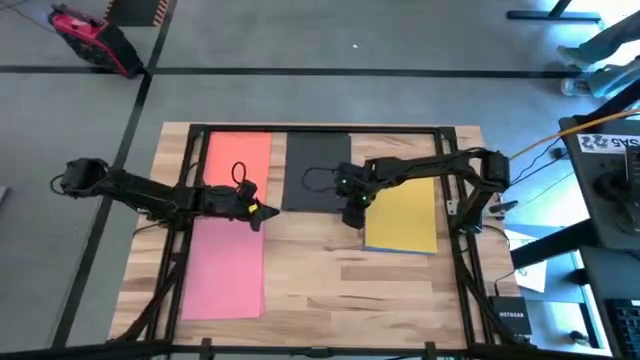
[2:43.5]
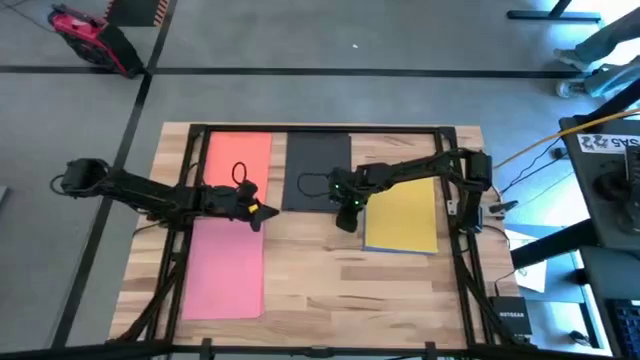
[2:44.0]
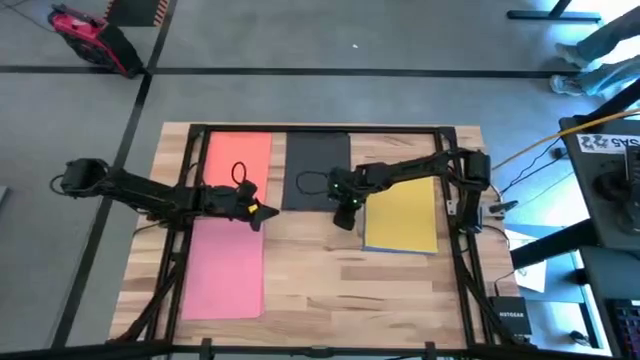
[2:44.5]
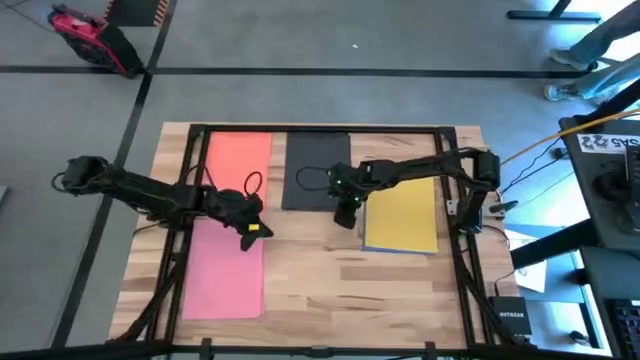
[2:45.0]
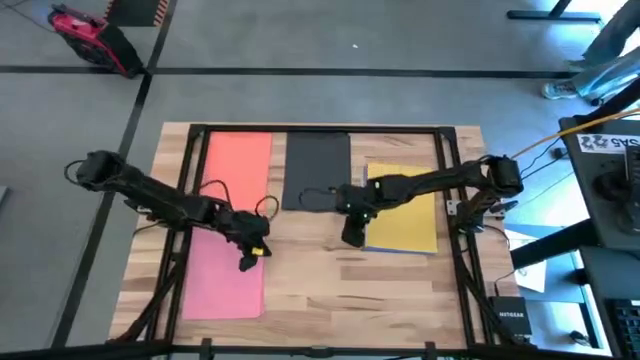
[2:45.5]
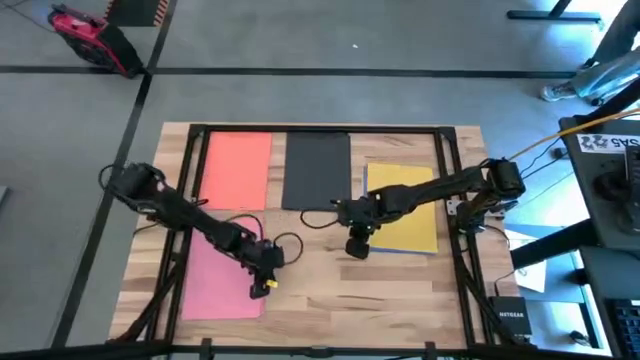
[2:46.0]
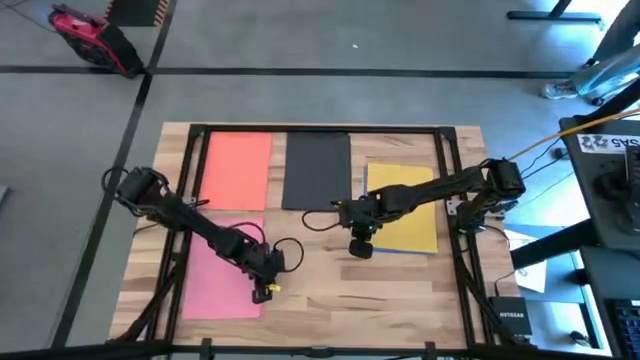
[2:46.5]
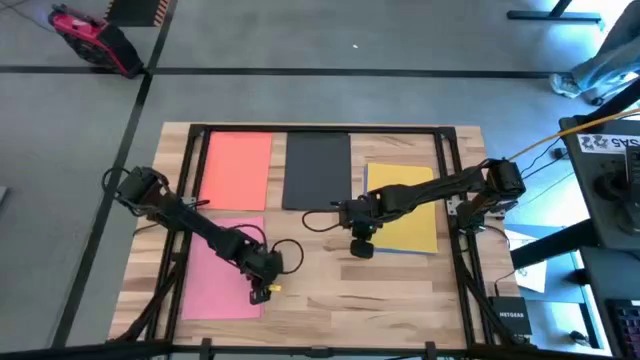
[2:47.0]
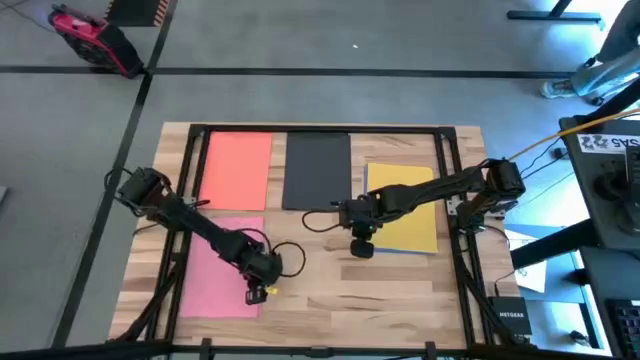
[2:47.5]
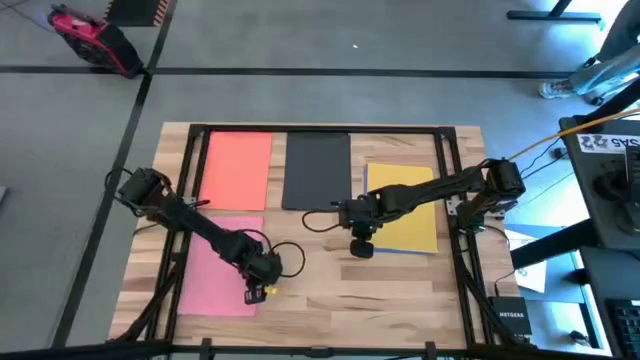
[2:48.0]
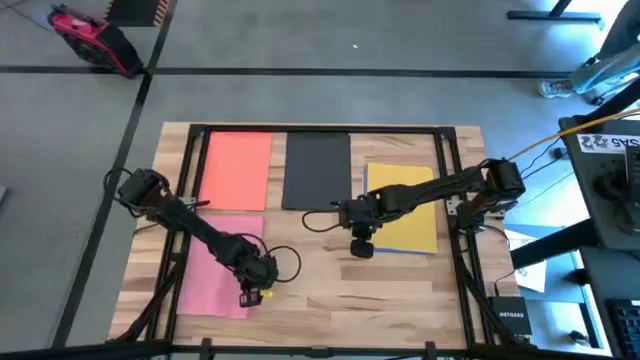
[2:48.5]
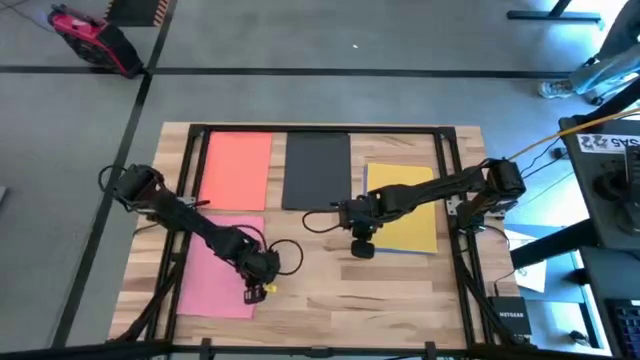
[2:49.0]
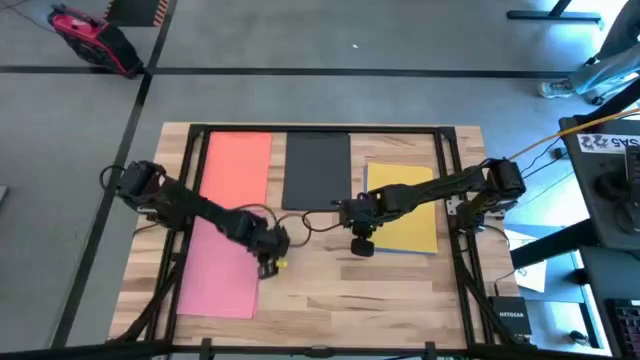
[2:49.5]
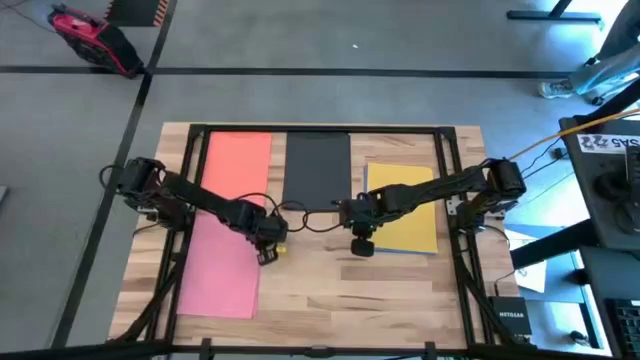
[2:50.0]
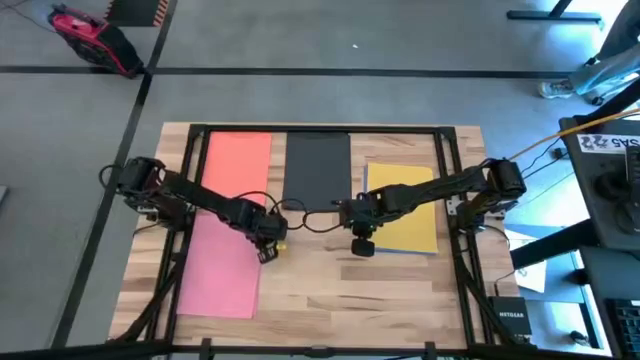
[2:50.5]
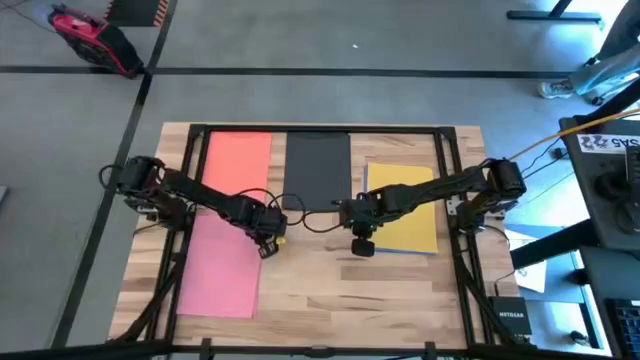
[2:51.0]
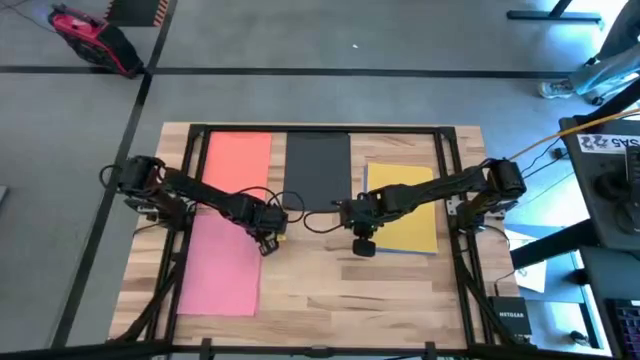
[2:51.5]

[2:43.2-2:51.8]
Task: Organize paper
Adjust the stacked pink color papers

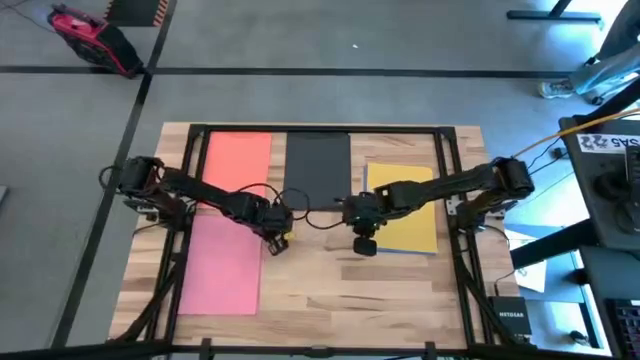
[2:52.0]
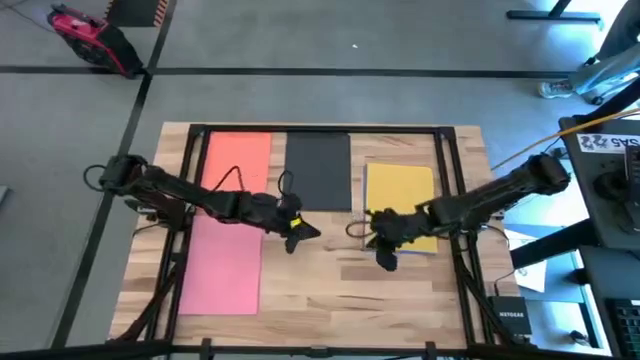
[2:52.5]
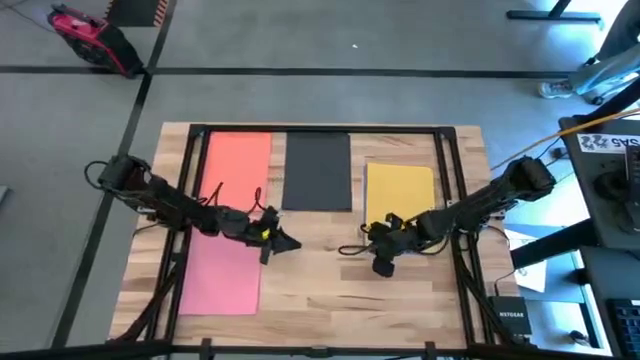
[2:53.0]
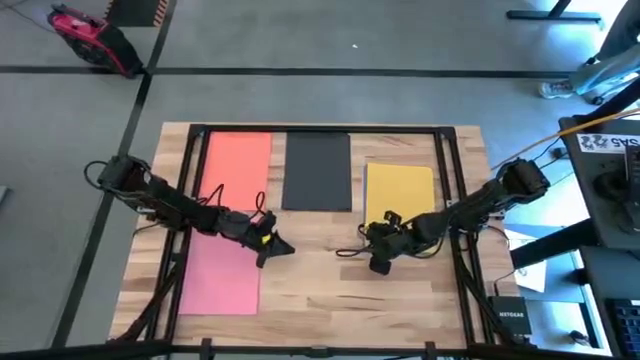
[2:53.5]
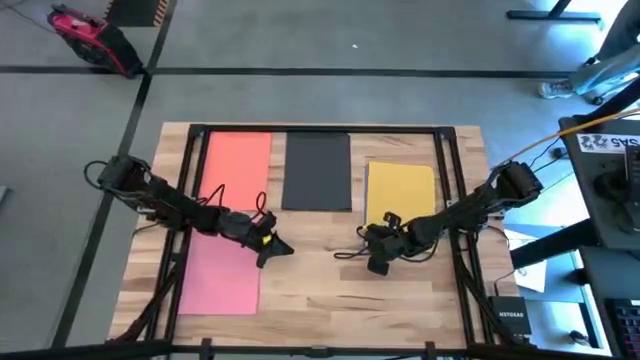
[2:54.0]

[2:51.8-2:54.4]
Move the yellow color paper to the bottom center of the table

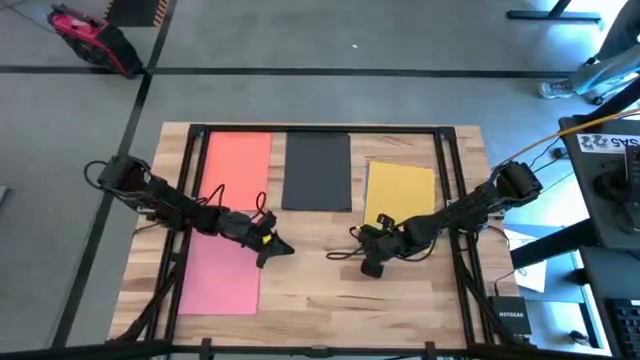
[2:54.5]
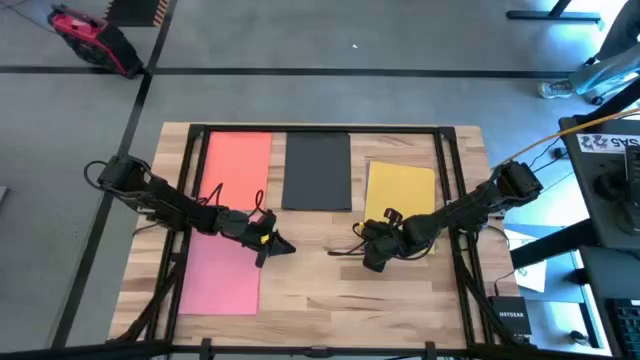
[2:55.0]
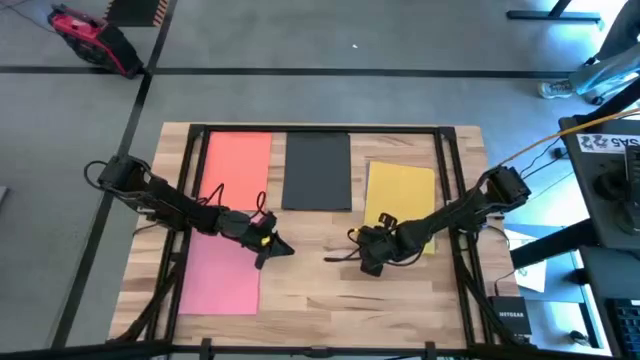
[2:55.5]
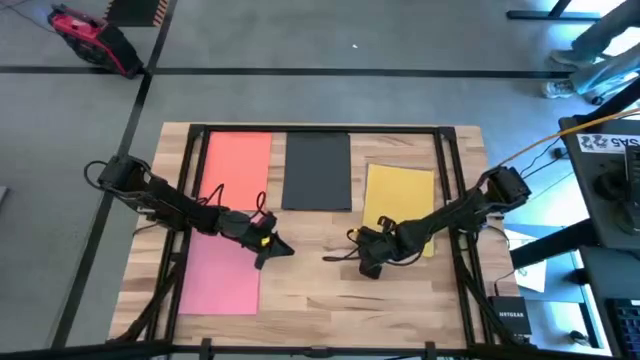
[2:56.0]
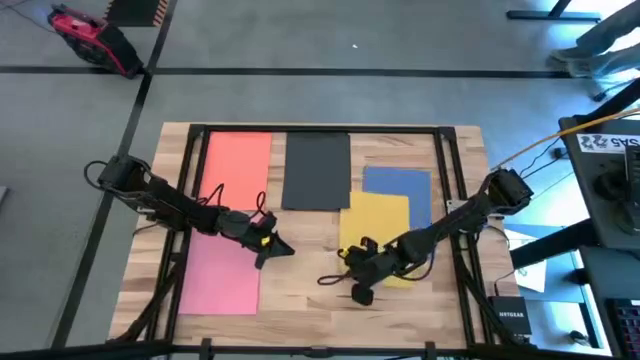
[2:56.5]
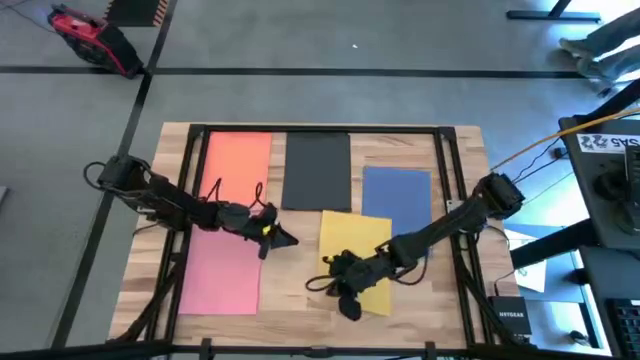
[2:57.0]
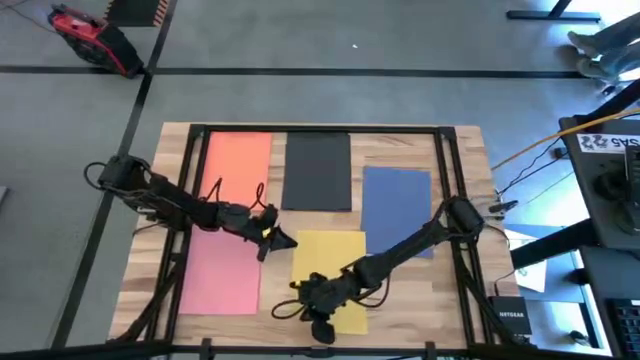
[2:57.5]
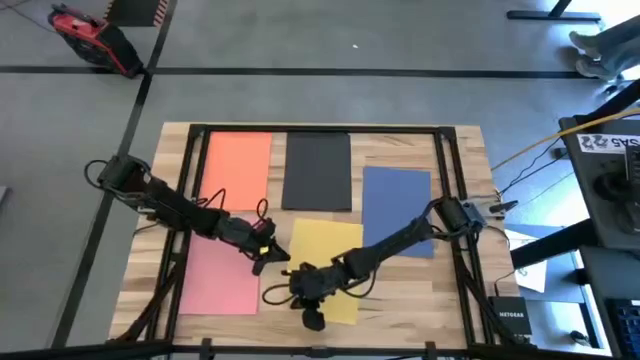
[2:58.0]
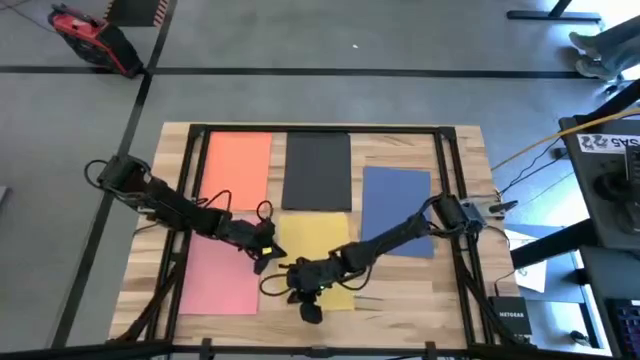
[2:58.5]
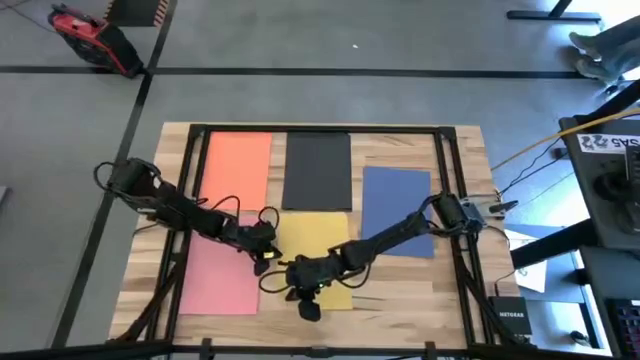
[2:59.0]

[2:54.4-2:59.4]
Move the yellow color paper to the bottom center of the table

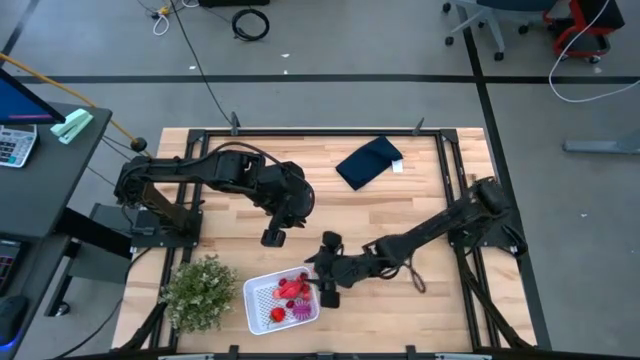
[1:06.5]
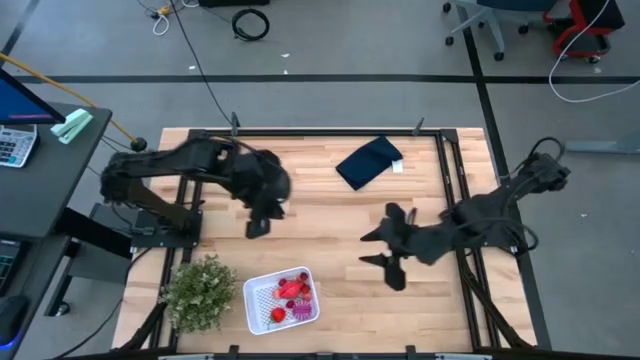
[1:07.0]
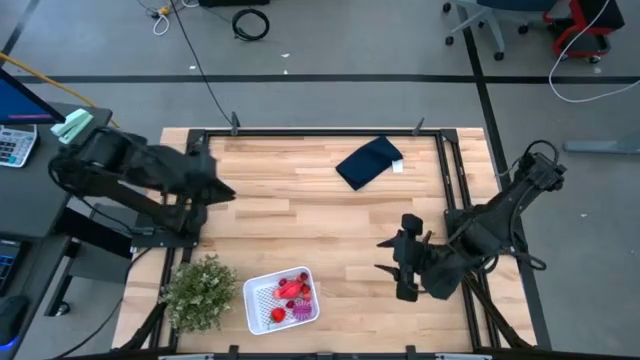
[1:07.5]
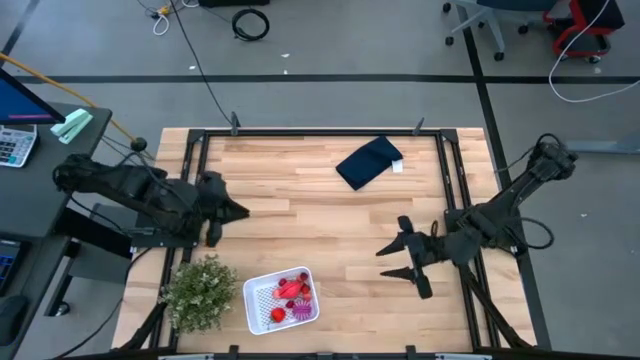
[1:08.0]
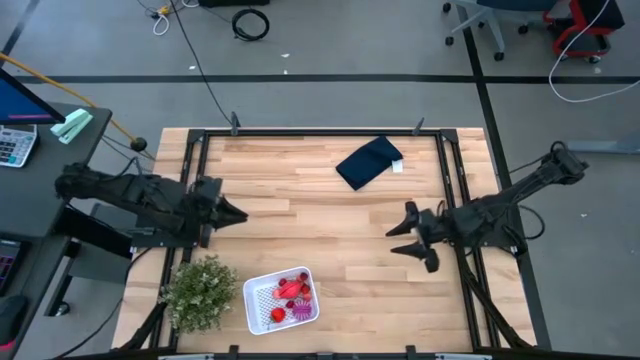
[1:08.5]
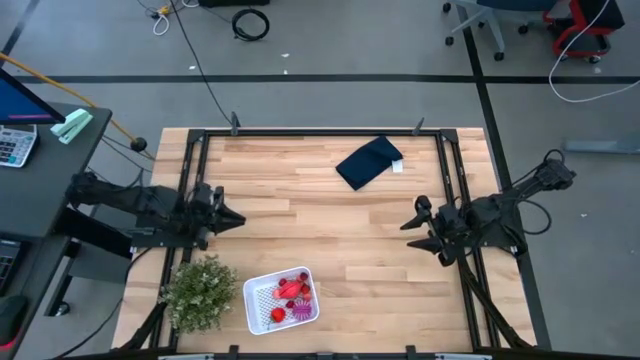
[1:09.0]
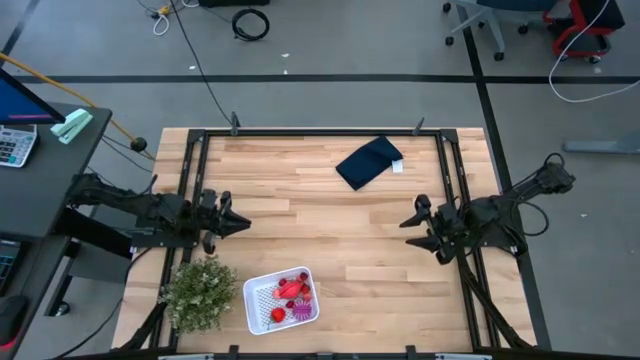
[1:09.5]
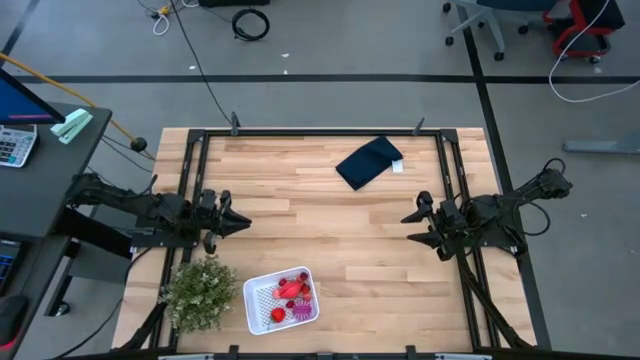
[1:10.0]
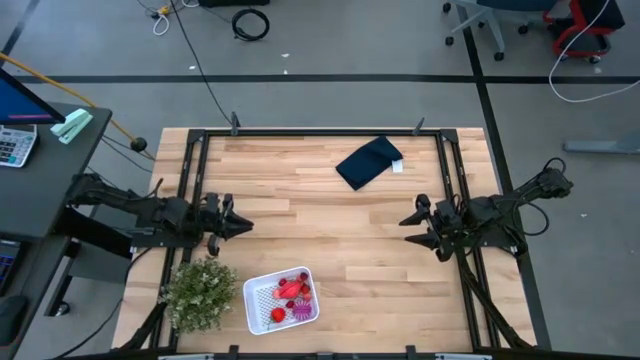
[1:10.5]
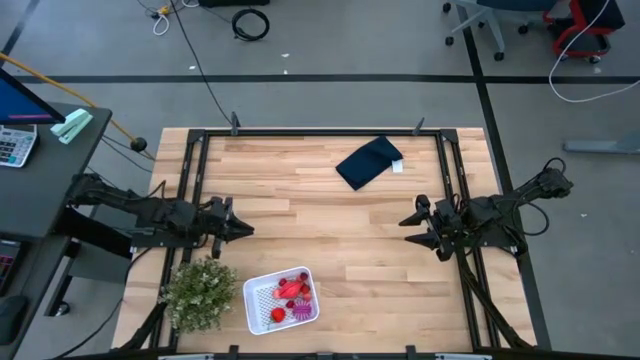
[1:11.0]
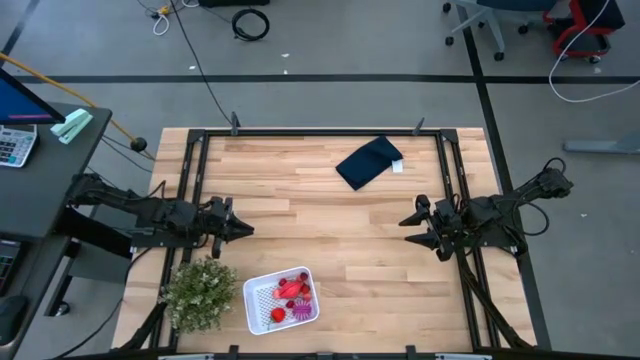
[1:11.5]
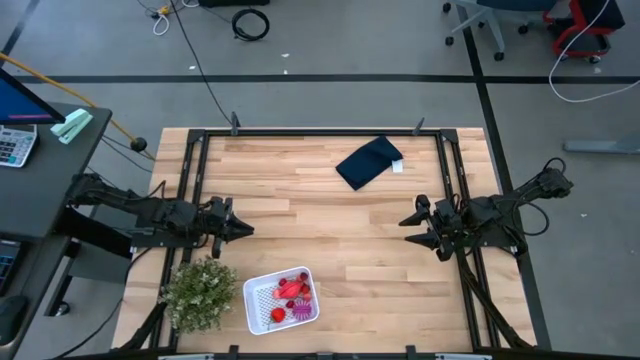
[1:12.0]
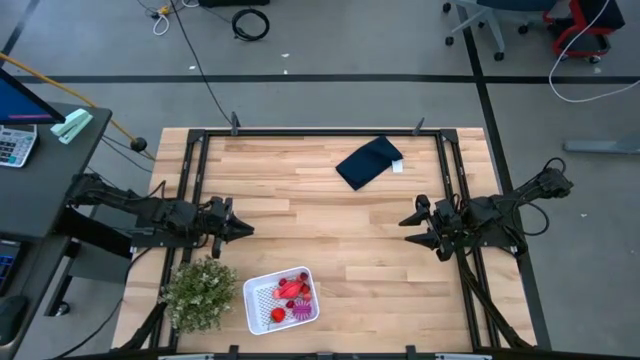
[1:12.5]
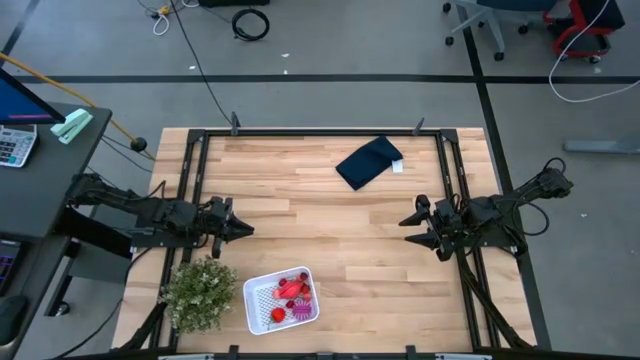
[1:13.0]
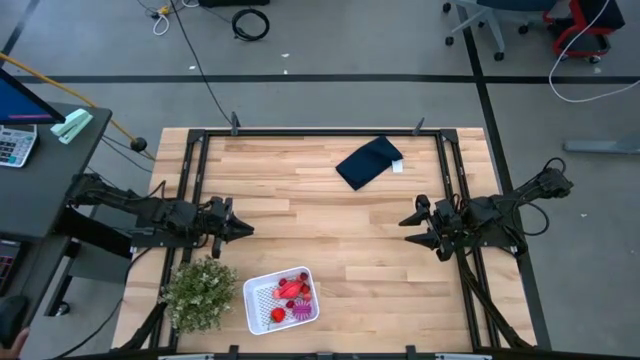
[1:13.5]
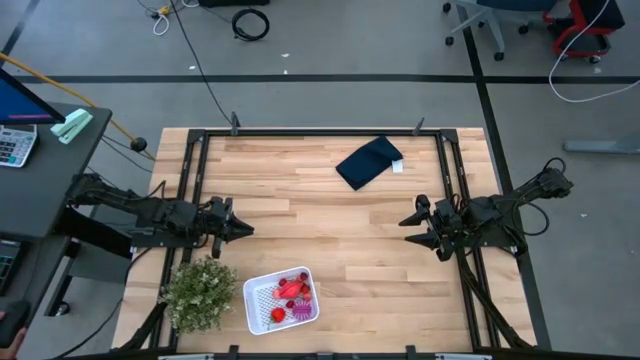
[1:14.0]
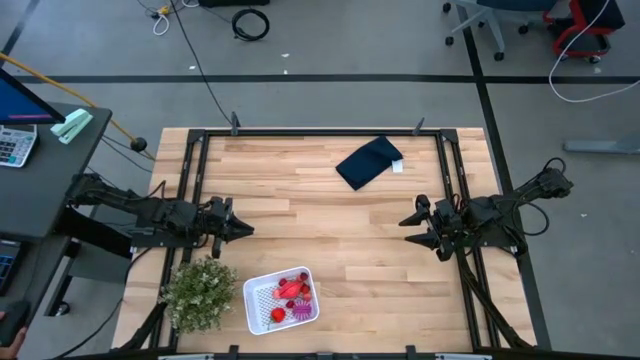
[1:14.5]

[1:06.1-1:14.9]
Task: Pick and placing Produce into tupperware
Return to Home Position
